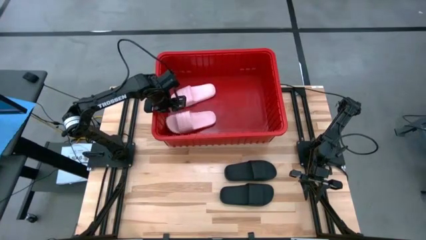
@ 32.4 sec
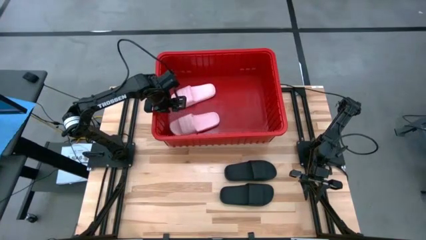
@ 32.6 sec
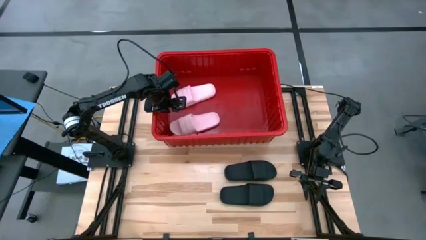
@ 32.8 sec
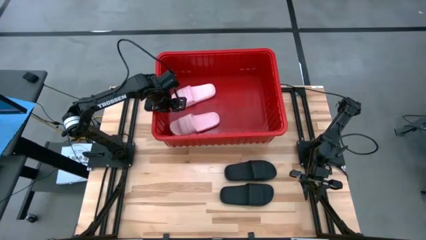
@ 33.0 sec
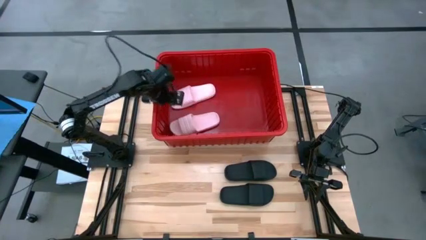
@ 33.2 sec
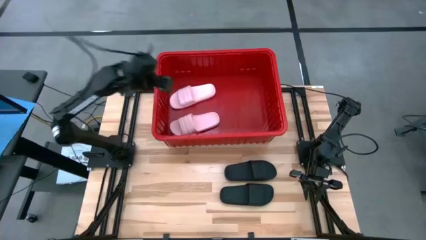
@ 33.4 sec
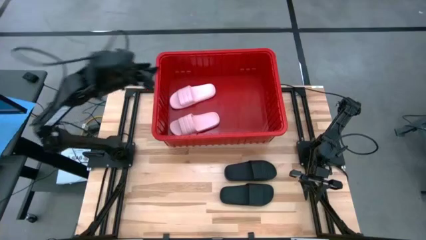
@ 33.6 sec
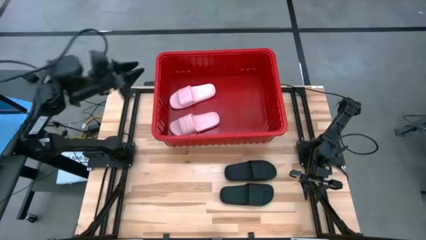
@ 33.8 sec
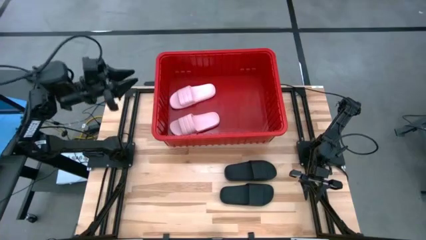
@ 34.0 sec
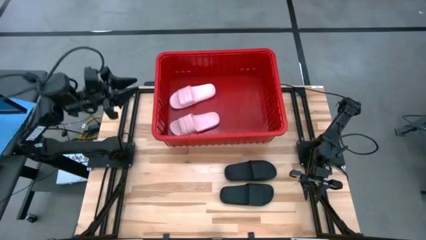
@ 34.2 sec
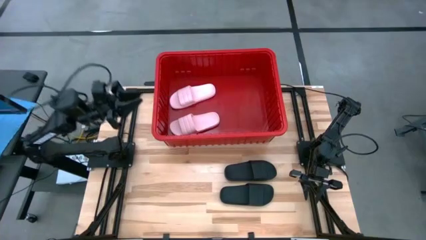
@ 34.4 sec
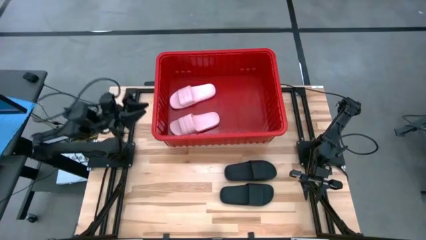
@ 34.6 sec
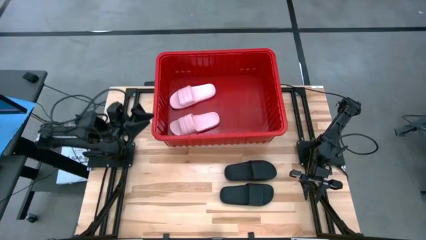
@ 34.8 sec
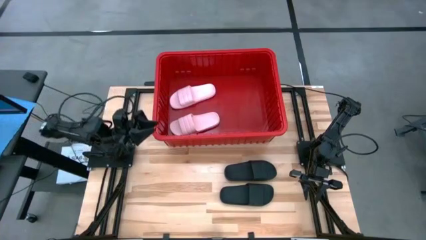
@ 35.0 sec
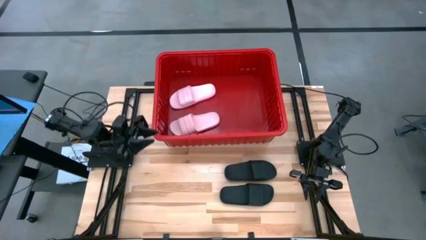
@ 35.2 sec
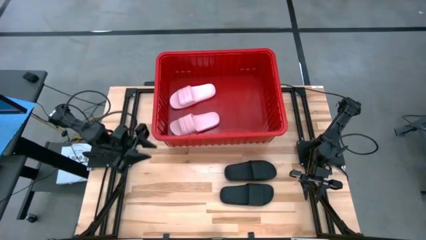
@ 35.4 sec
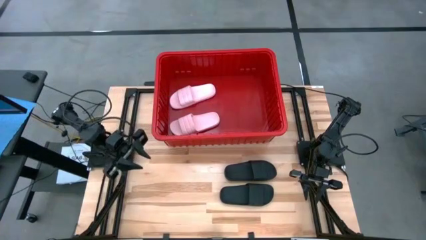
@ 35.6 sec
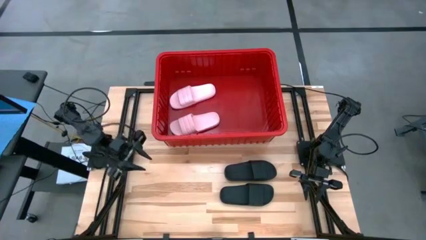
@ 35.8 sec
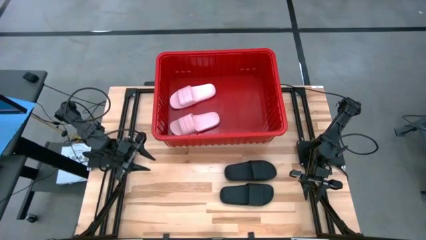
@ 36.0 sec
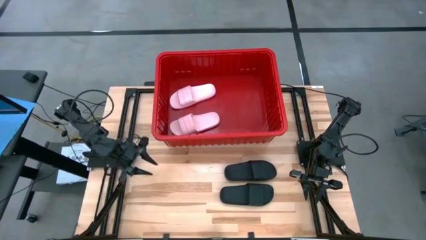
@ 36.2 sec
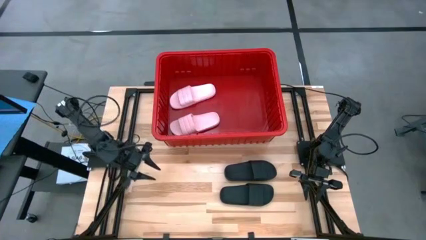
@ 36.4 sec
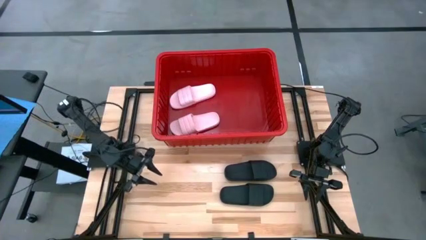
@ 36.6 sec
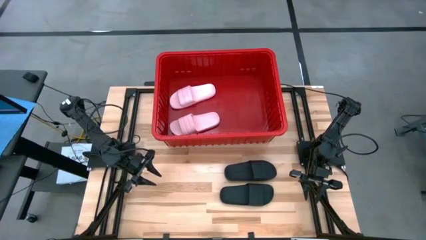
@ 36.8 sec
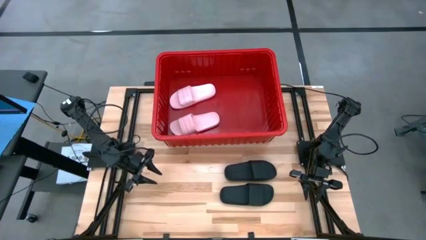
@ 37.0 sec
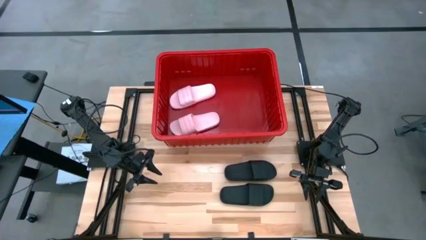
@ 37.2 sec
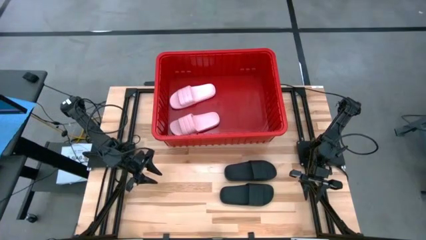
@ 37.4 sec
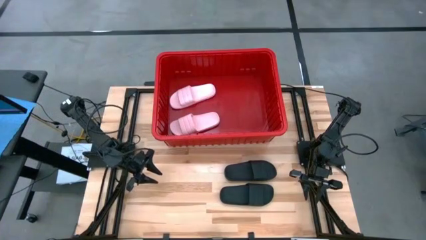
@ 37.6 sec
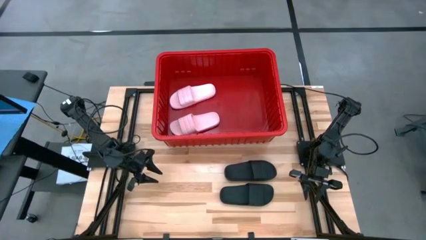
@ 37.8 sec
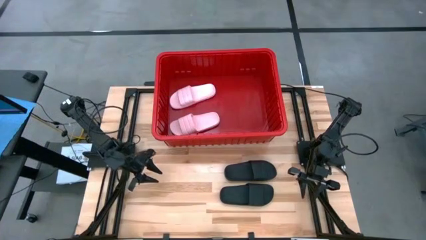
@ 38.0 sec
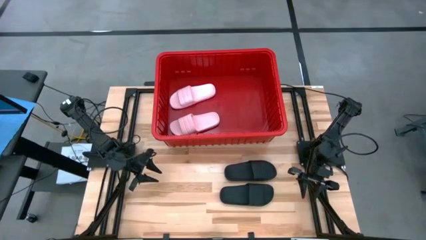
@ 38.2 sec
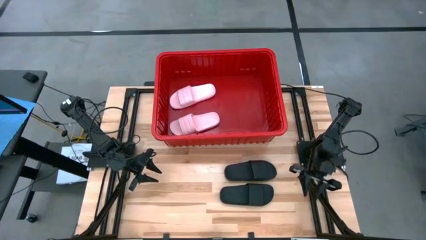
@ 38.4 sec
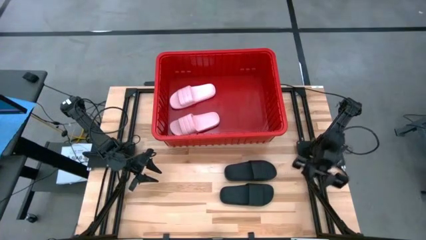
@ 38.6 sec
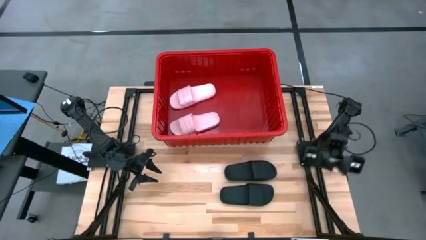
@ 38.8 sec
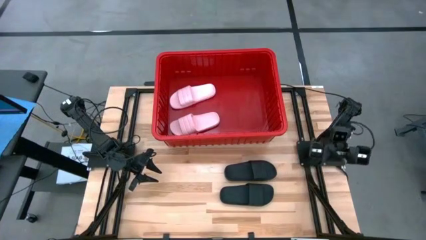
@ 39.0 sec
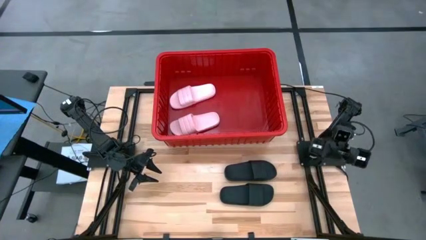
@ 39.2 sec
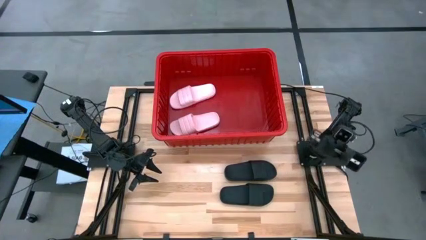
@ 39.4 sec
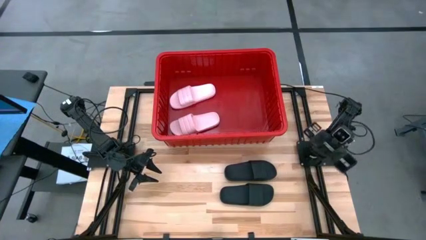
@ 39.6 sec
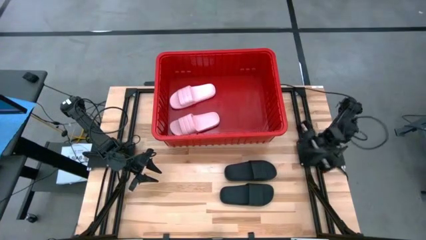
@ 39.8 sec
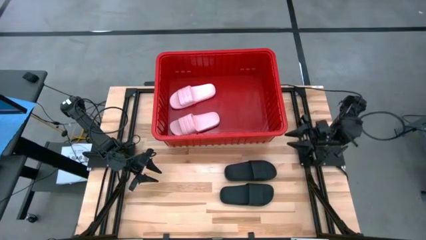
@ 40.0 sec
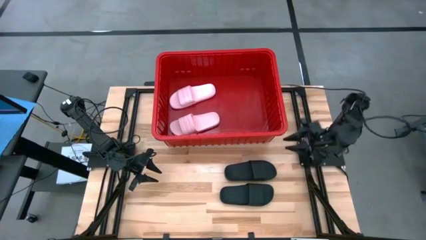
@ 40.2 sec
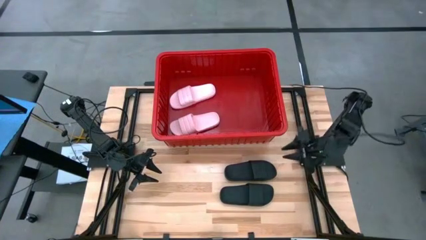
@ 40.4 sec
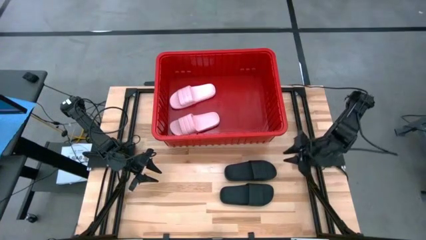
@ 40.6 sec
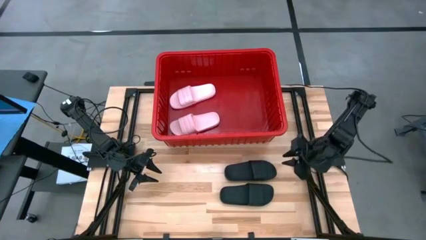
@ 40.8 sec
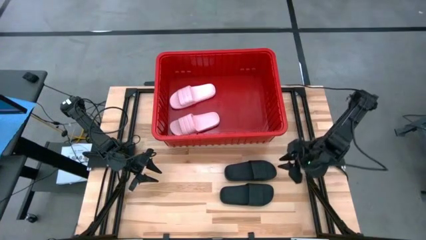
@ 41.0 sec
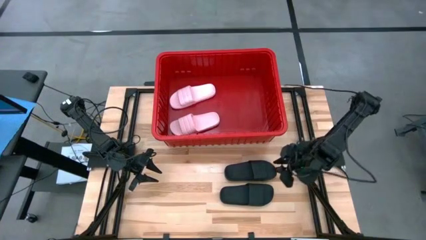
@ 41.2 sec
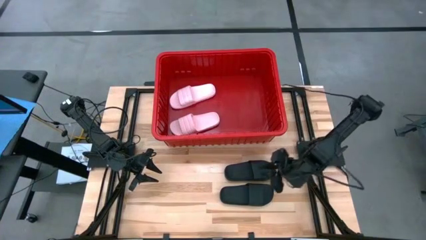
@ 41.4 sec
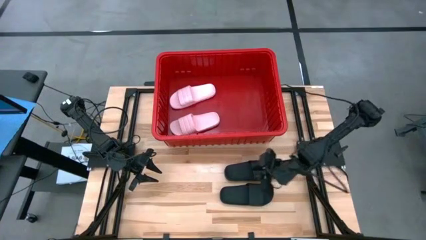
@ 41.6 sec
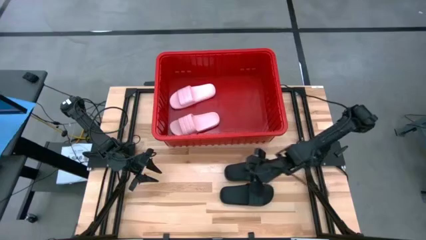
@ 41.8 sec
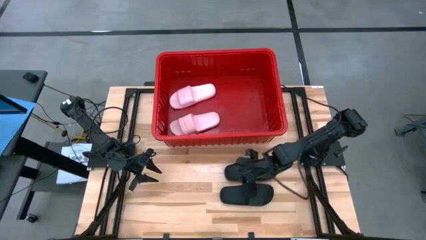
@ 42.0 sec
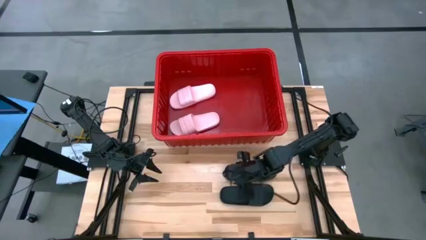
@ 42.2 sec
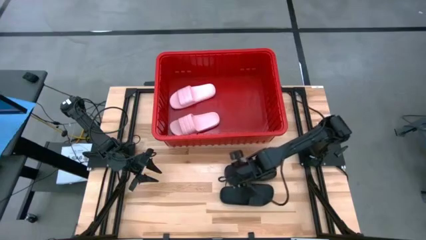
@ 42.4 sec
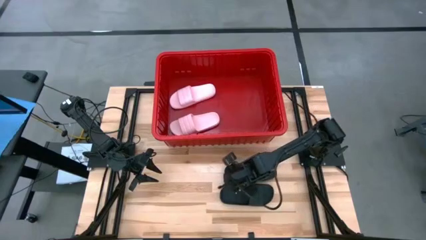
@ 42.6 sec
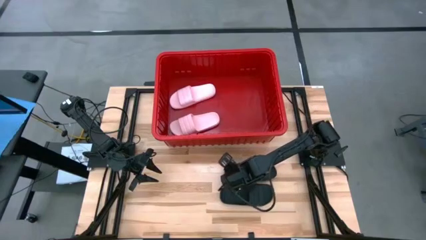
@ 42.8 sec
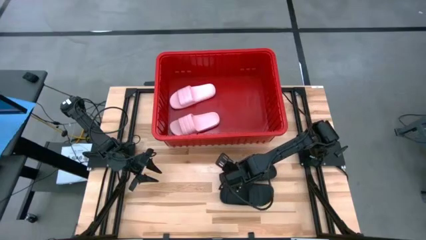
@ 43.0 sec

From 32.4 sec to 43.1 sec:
Task: Pick and place slides into bin
Put the top black slide into the red bin
